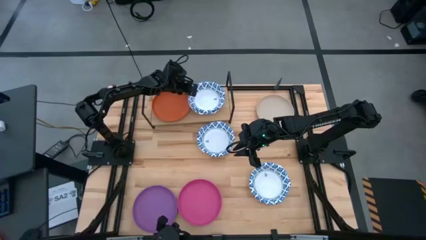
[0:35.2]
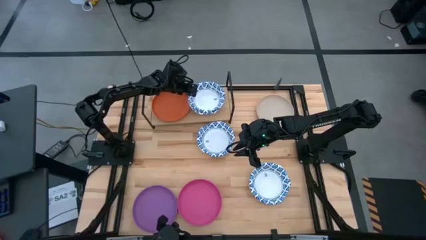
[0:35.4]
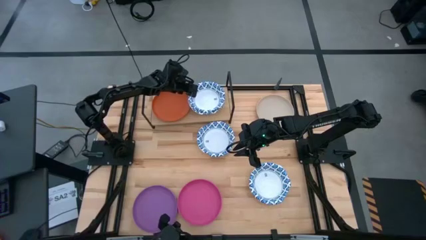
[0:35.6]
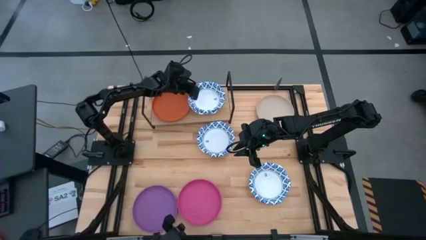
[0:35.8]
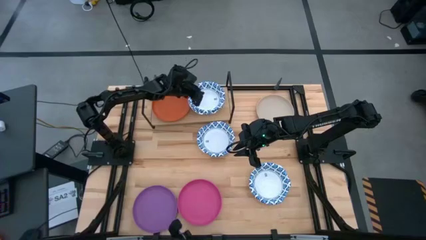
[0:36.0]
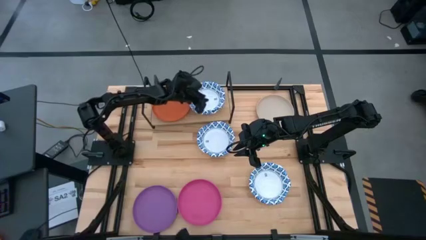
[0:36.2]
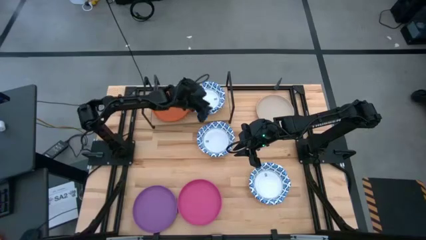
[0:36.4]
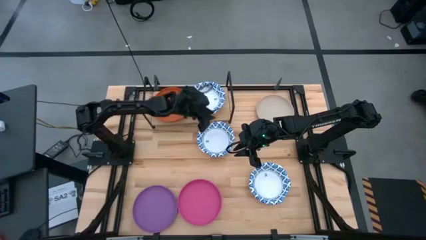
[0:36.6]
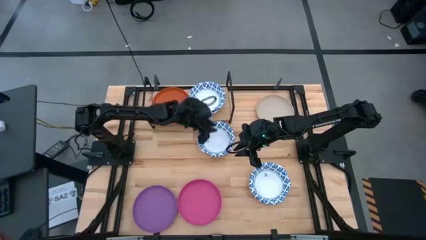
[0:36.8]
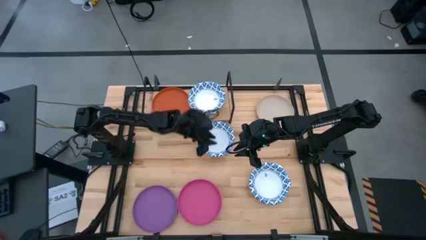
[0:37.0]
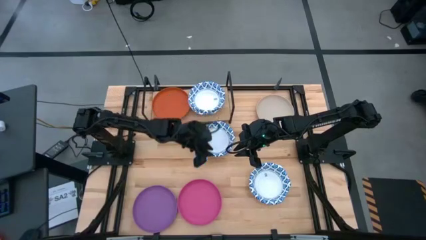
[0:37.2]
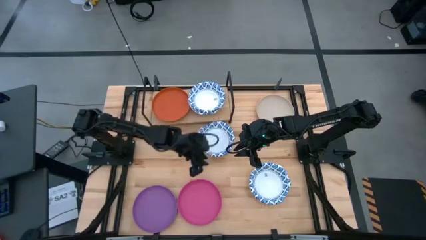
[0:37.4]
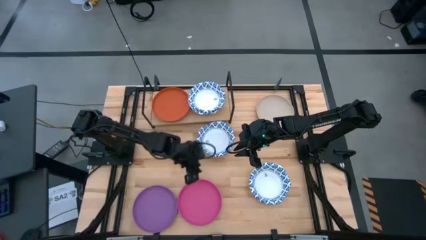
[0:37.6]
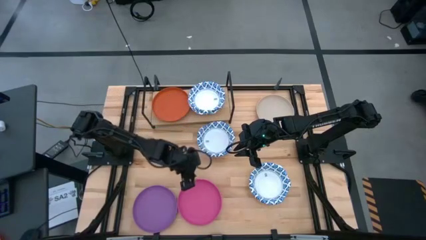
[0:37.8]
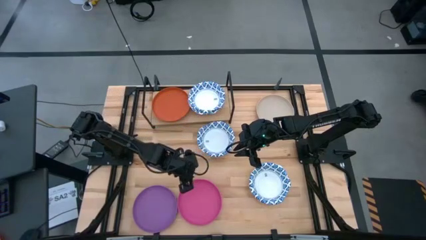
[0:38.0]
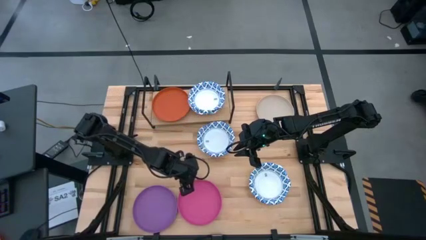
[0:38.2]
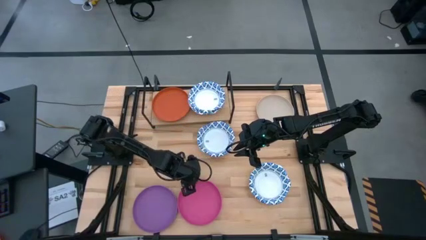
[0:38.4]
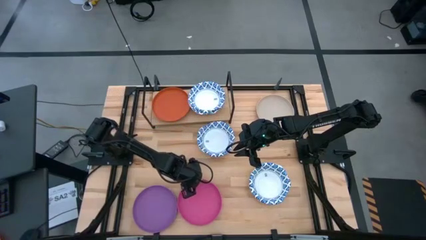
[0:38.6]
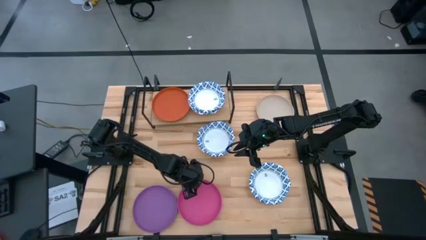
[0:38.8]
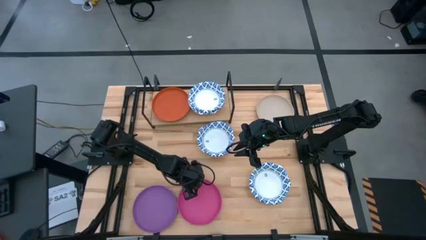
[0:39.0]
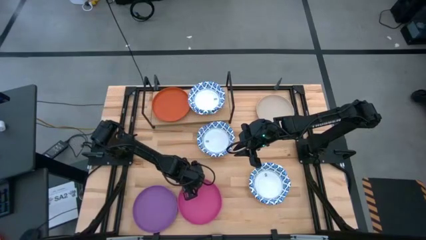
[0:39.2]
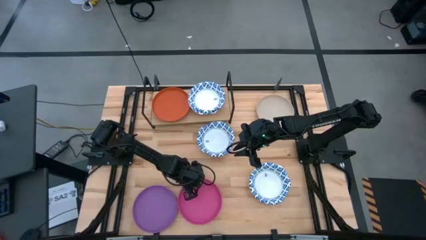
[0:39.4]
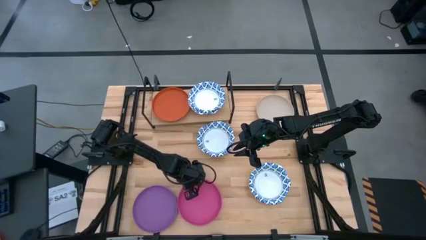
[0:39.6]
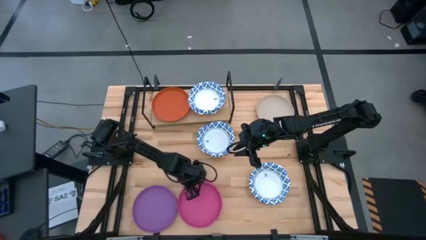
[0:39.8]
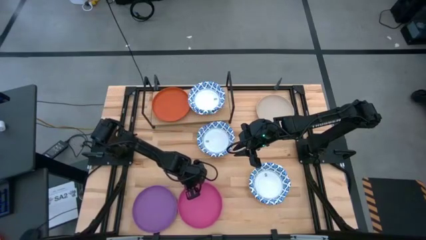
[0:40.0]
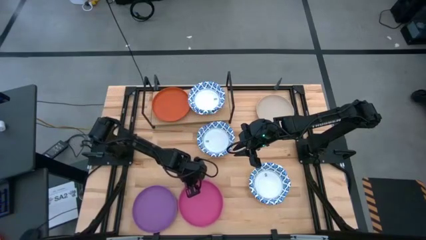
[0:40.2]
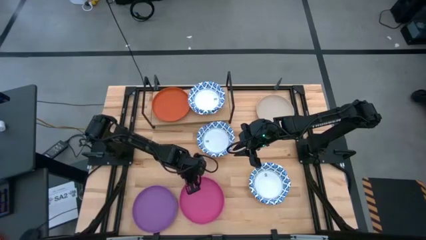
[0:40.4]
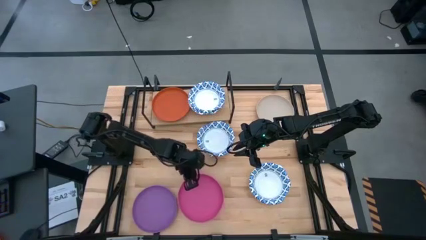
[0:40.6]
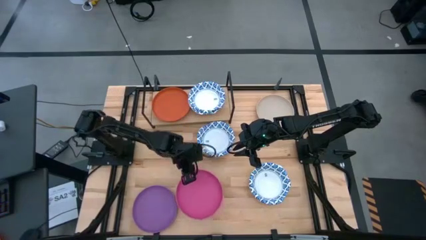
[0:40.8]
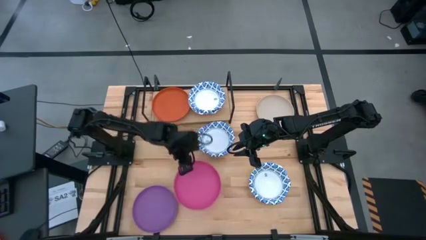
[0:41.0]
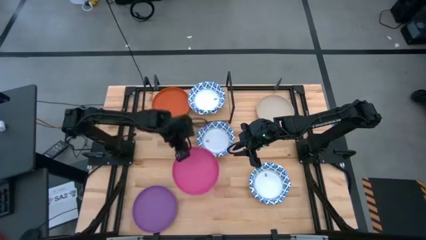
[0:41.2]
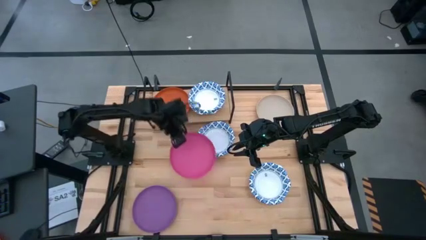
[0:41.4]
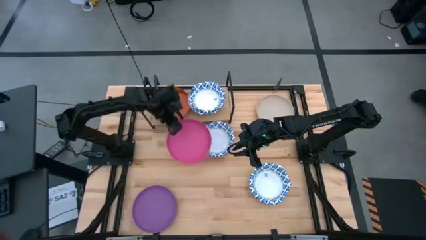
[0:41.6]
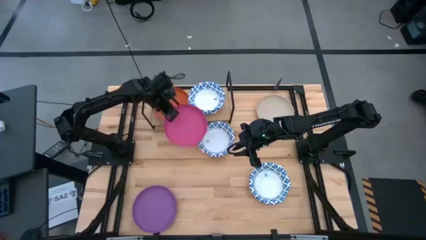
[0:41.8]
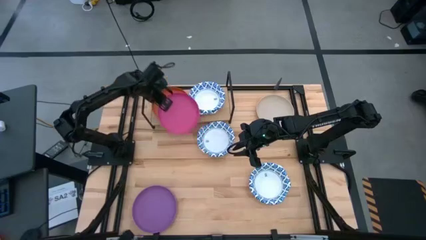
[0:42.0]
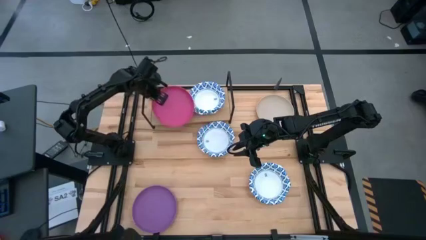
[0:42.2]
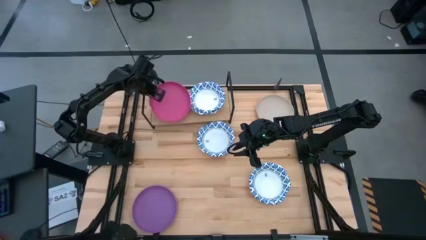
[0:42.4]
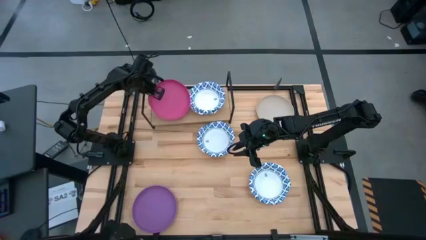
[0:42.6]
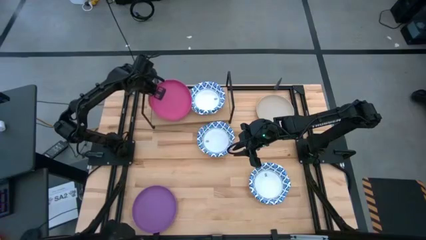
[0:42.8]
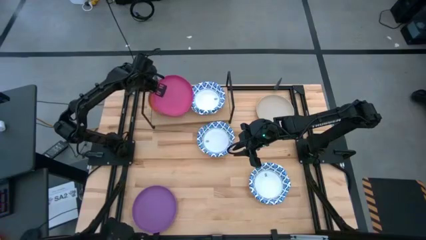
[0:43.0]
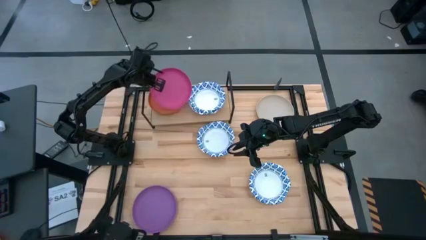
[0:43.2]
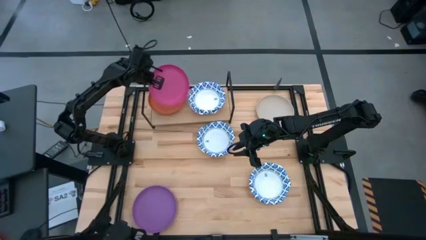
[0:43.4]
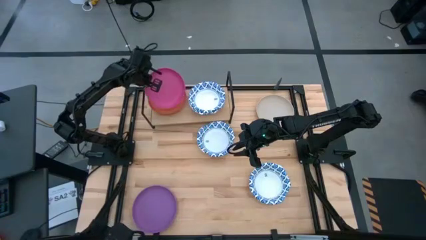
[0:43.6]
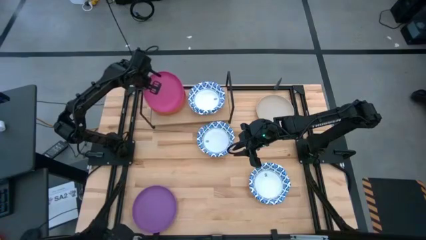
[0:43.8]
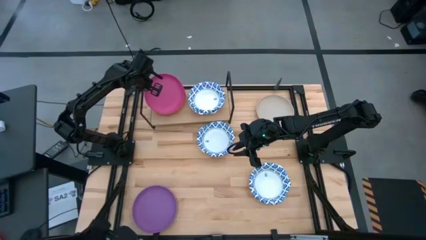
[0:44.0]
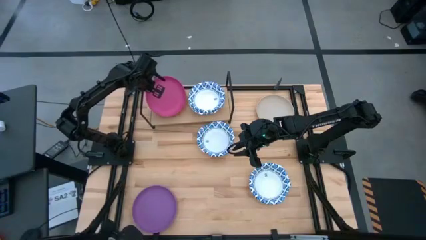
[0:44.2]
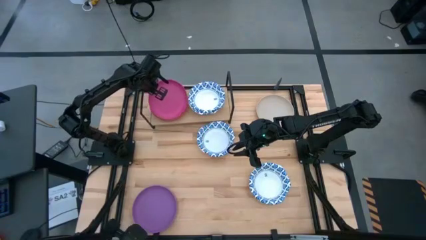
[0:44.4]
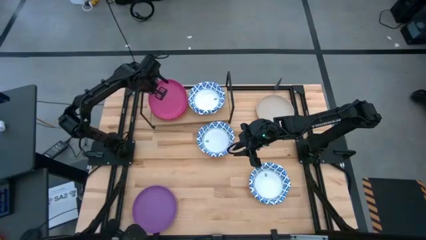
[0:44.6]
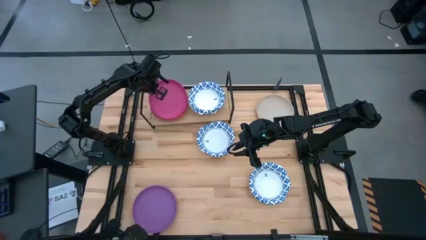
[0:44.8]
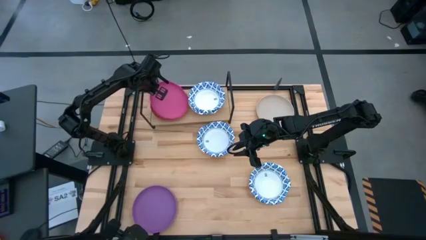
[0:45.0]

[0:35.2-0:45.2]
Task: Place and stack plates onto a shelf
Stack the pink plate on top of the orange plate on the shelf
